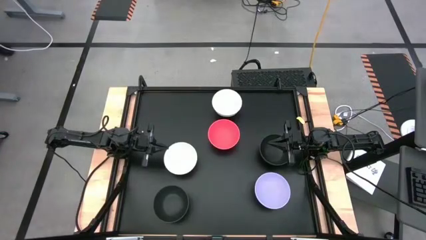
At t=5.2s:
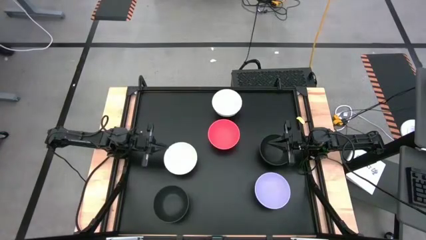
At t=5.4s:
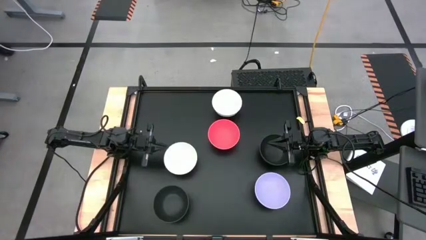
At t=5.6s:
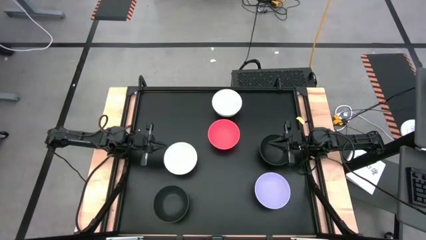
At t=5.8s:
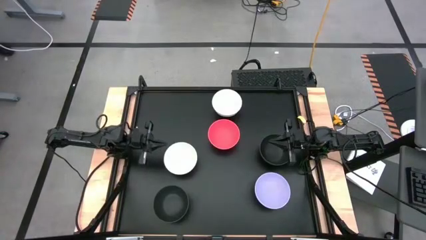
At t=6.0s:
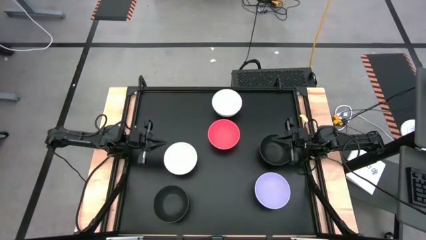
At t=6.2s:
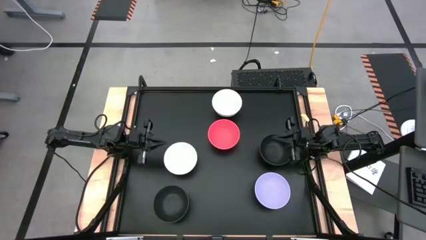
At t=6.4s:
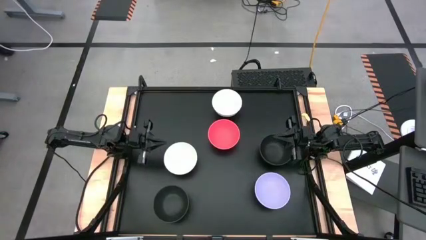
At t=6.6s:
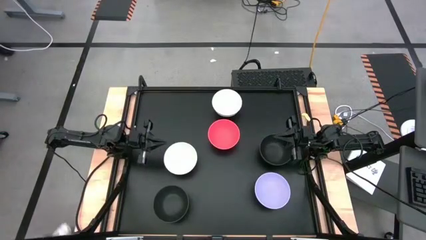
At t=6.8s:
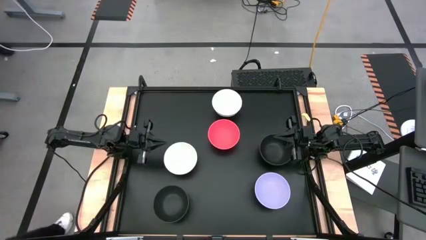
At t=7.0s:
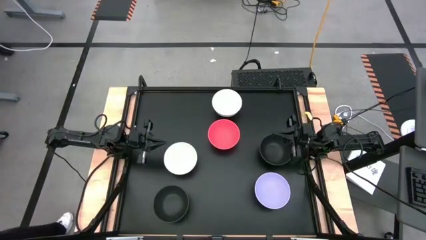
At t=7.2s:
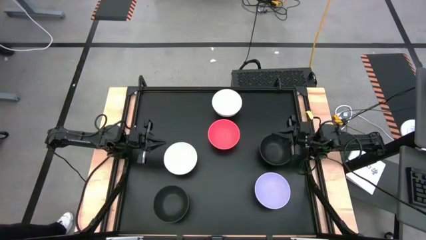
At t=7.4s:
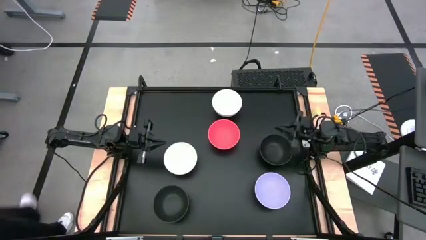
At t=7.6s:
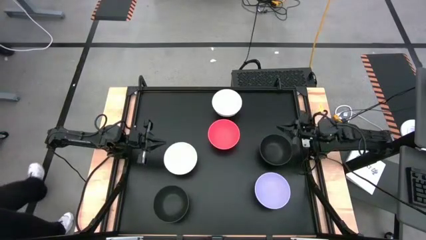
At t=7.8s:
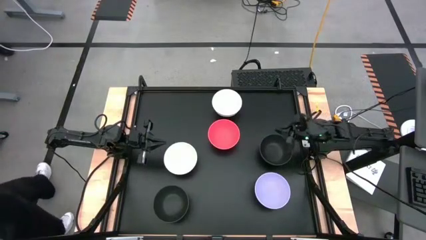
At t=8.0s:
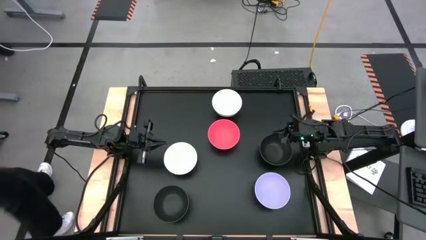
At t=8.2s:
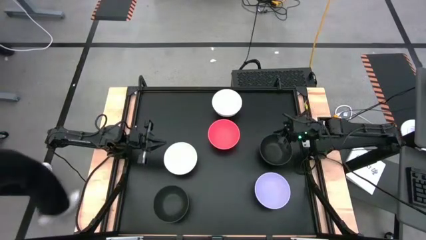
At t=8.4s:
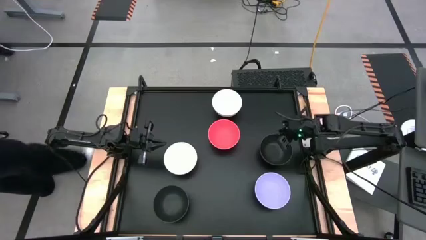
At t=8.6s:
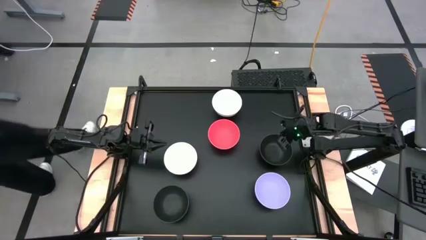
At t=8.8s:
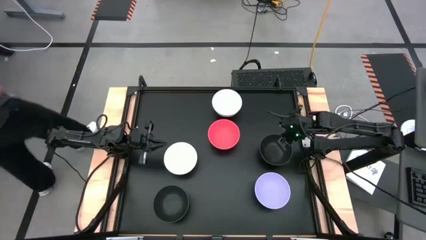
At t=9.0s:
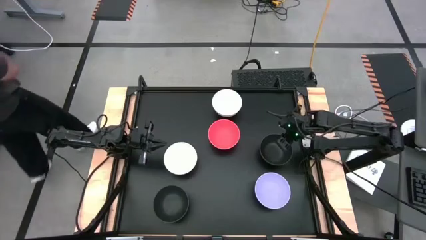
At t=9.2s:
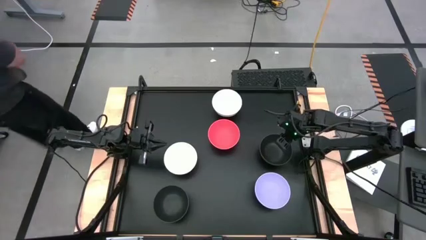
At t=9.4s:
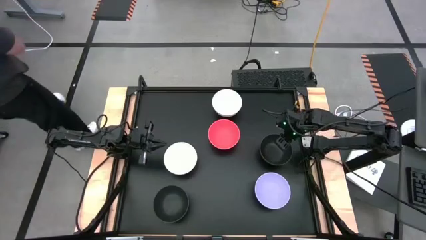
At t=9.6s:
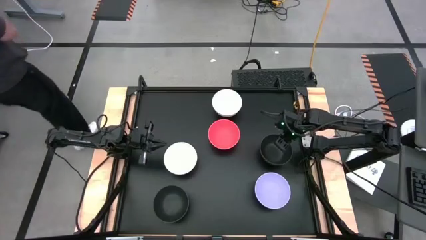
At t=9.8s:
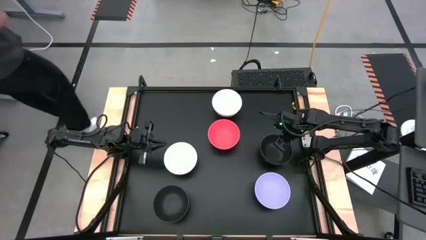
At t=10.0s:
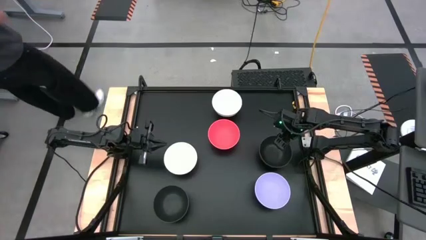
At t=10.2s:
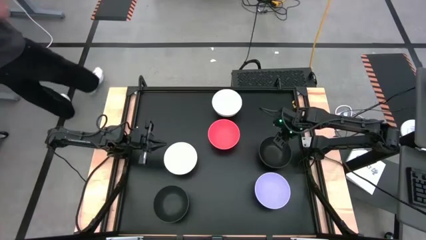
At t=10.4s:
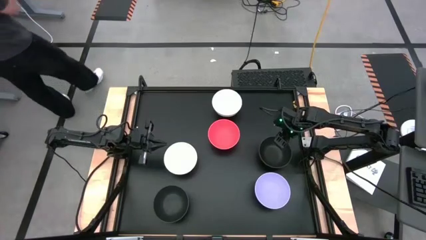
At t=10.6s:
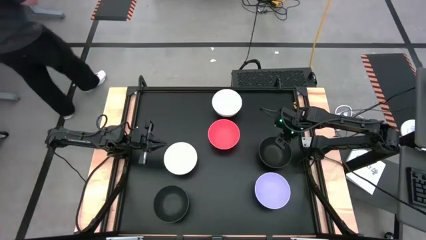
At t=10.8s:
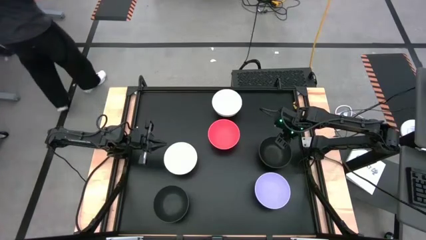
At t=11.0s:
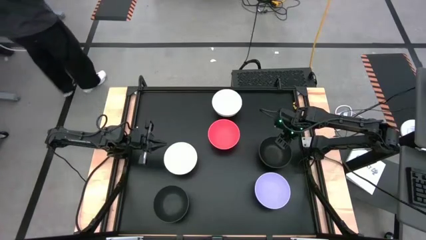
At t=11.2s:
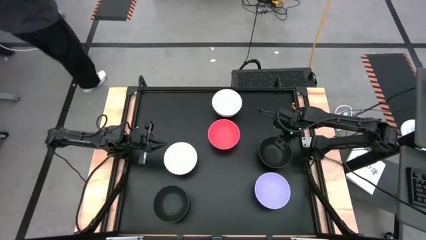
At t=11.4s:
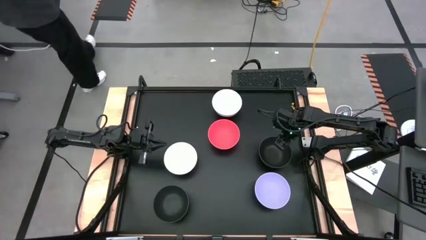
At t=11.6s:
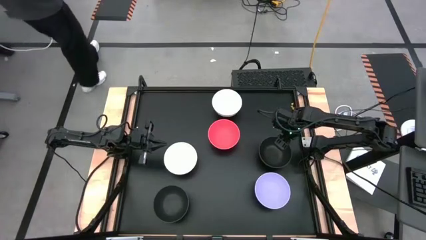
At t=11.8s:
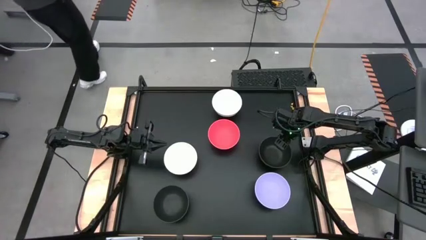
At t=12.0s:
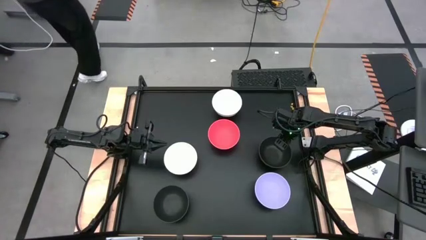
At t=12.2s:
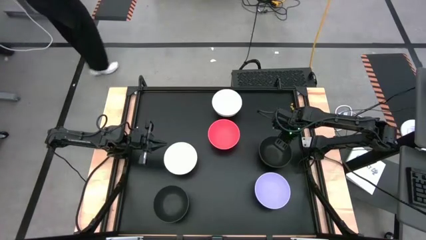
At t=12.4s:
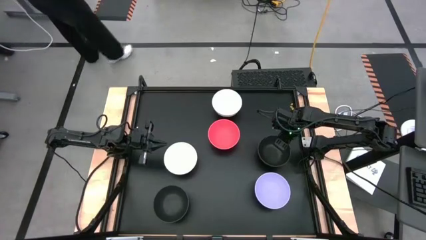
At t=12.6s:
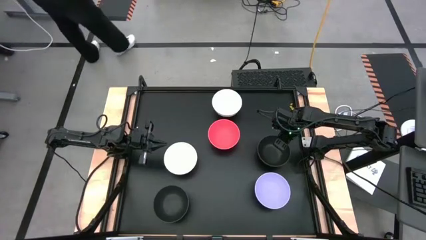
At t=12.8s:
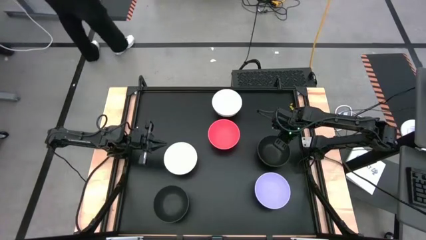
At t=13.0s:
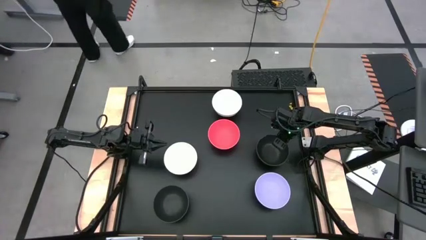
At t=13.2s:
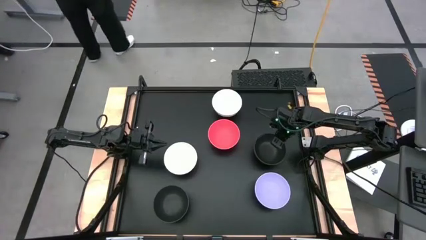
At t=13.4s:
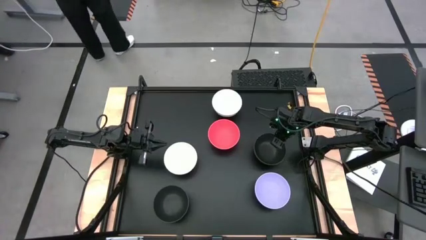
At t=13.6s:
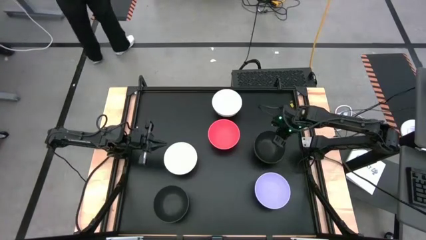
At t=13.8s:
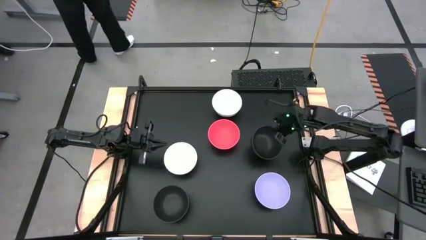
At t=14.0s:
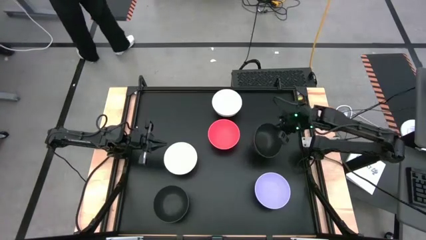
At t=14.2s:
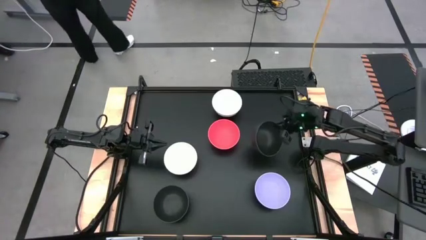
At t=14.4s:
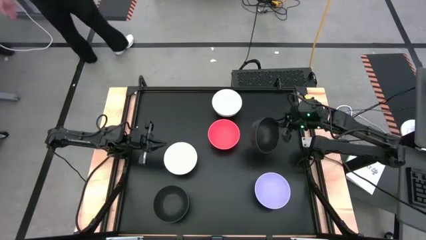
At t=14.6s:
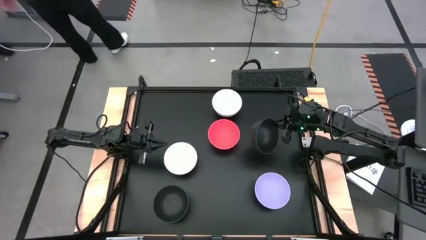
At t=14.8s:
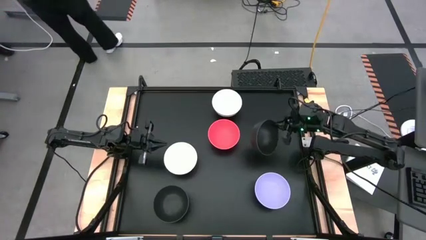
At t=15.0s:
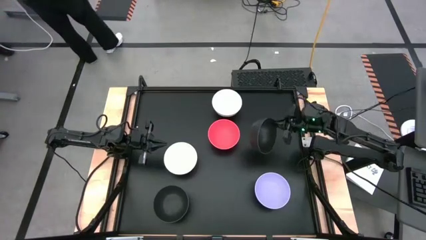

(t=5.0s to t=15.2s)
Task: Nest bowls inside each other
Stack the right black bowl on top of the red bowl
